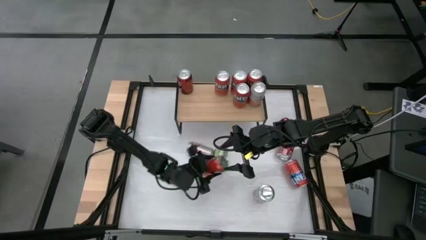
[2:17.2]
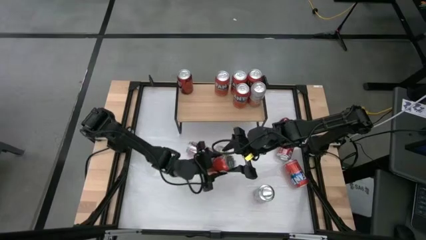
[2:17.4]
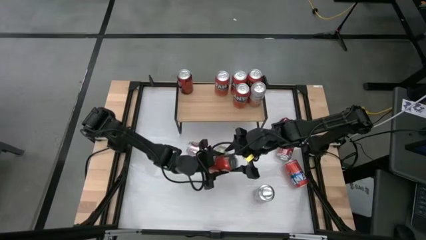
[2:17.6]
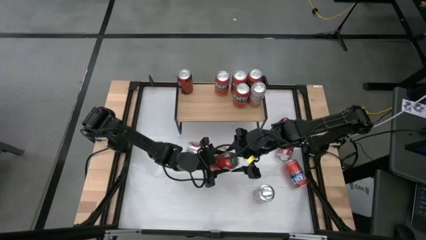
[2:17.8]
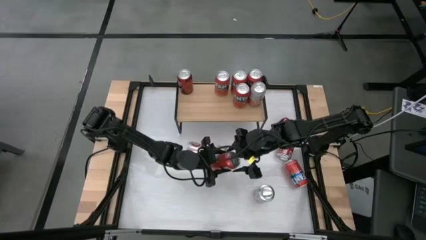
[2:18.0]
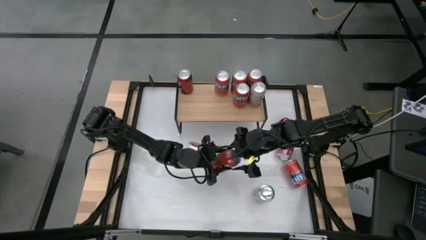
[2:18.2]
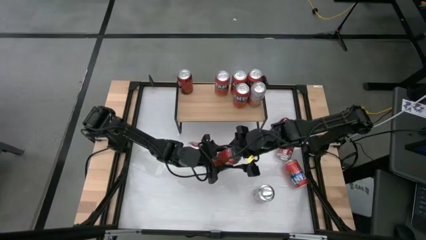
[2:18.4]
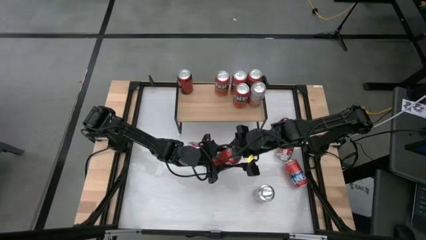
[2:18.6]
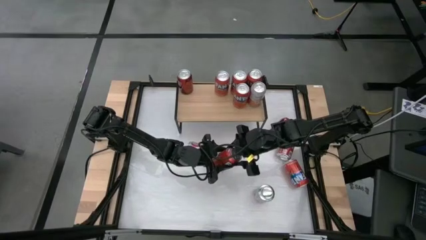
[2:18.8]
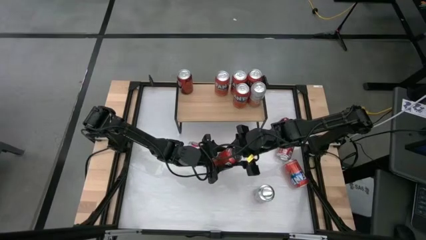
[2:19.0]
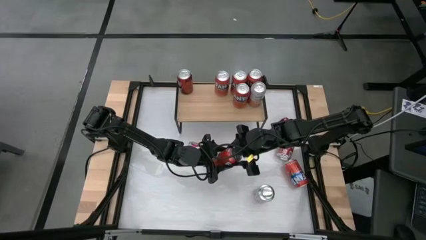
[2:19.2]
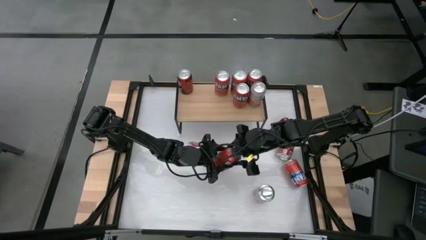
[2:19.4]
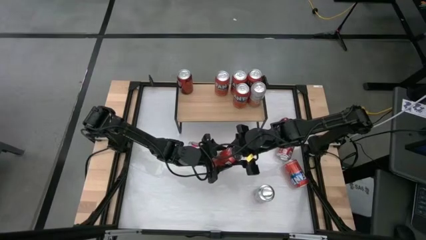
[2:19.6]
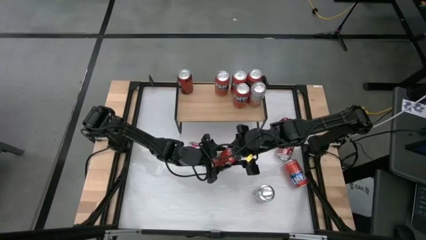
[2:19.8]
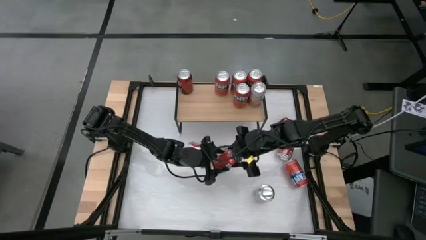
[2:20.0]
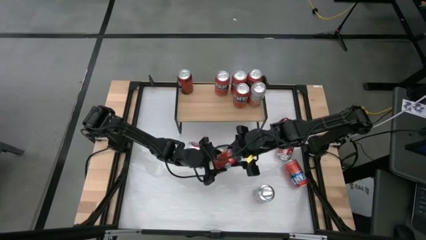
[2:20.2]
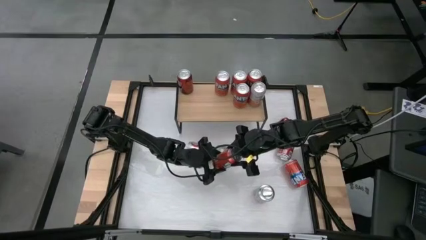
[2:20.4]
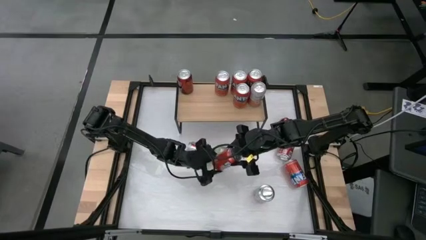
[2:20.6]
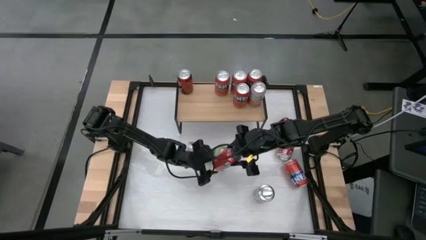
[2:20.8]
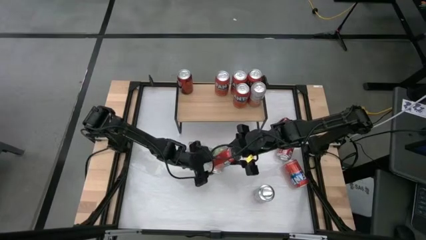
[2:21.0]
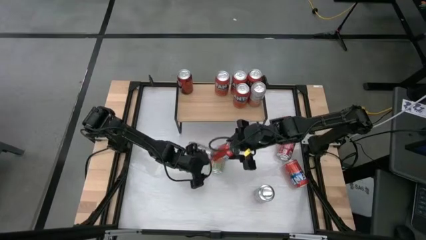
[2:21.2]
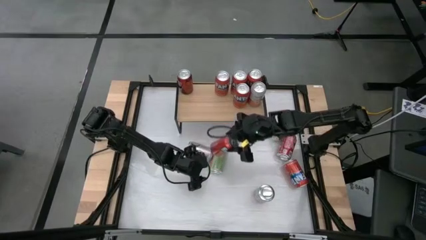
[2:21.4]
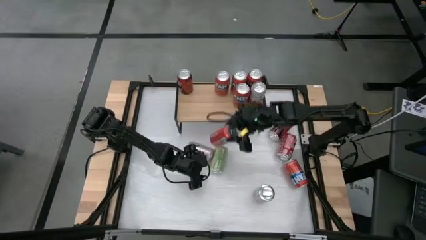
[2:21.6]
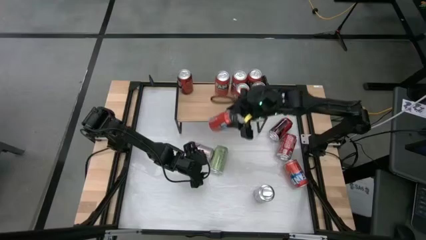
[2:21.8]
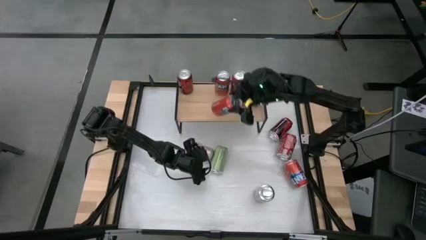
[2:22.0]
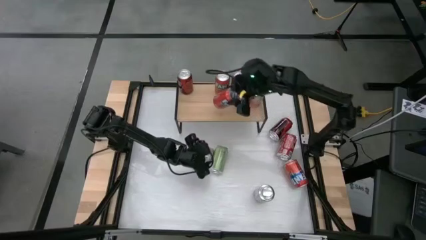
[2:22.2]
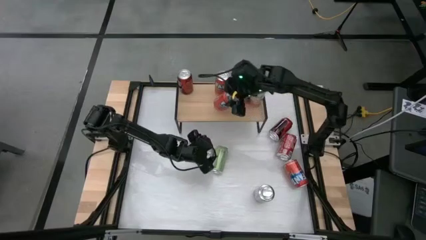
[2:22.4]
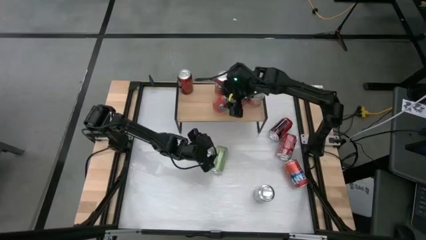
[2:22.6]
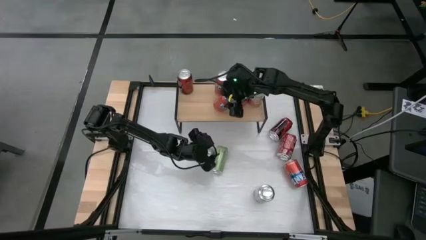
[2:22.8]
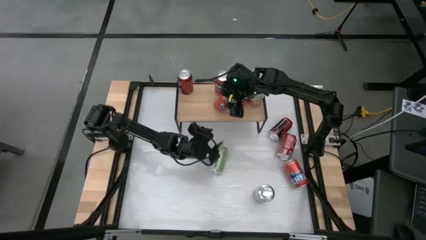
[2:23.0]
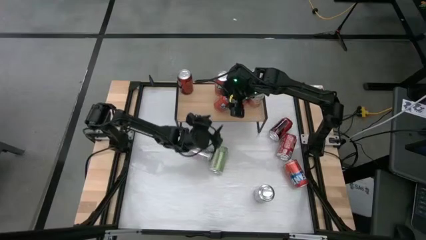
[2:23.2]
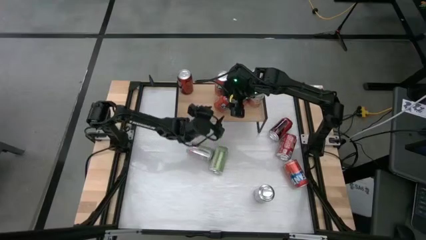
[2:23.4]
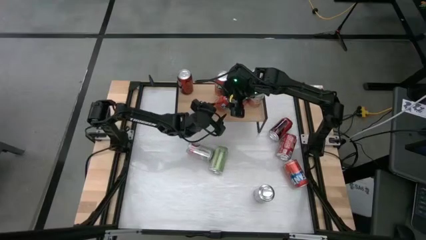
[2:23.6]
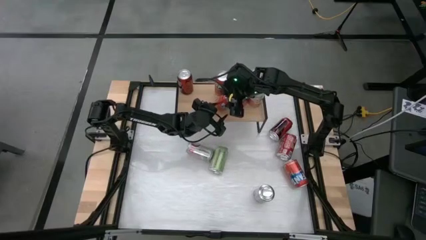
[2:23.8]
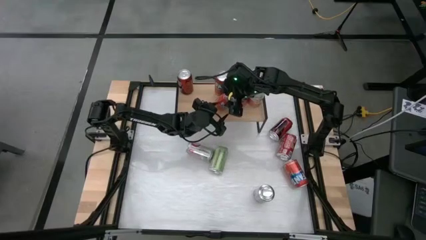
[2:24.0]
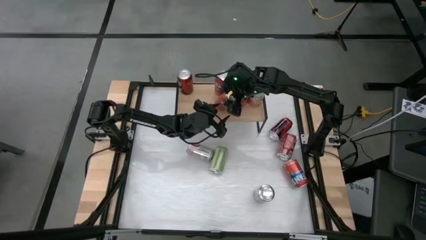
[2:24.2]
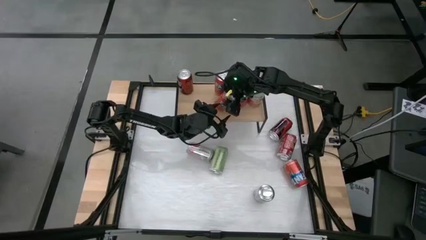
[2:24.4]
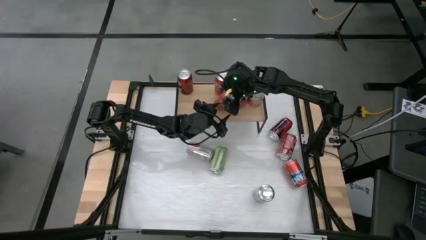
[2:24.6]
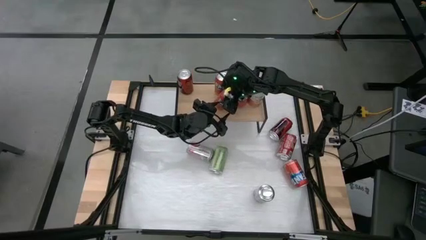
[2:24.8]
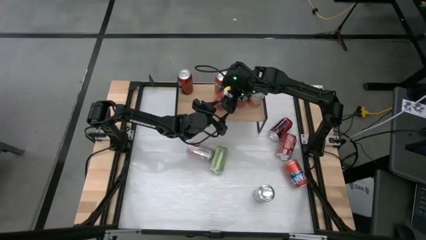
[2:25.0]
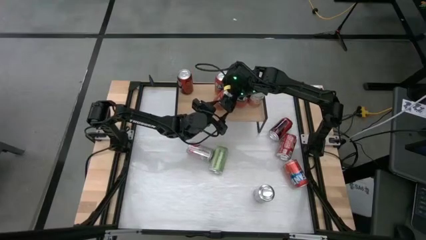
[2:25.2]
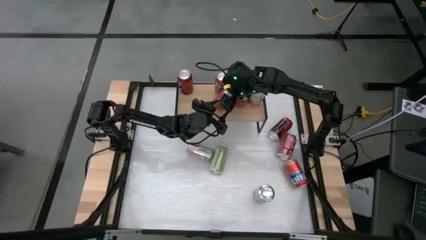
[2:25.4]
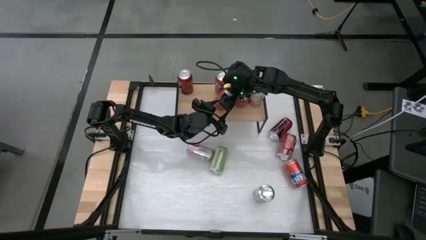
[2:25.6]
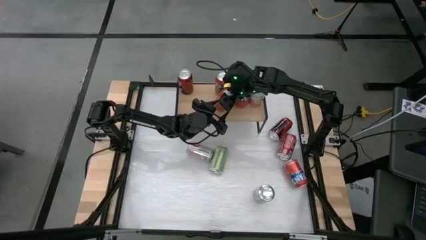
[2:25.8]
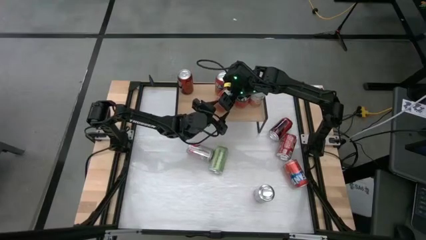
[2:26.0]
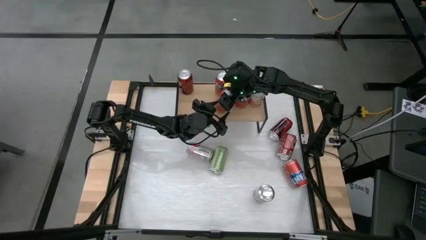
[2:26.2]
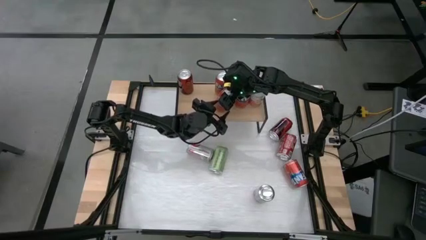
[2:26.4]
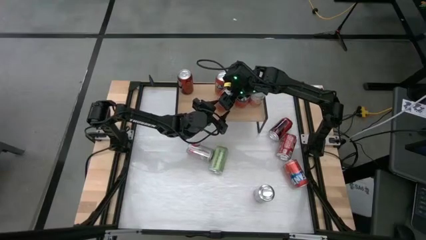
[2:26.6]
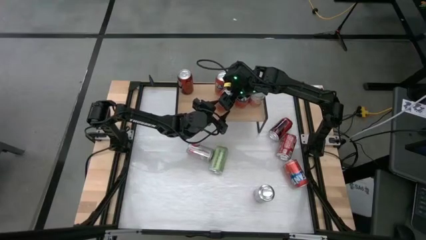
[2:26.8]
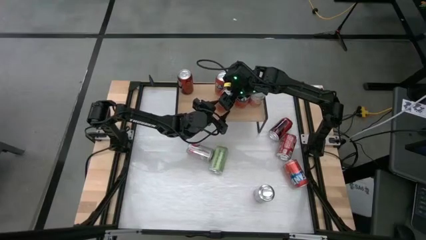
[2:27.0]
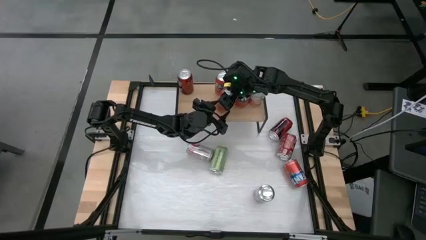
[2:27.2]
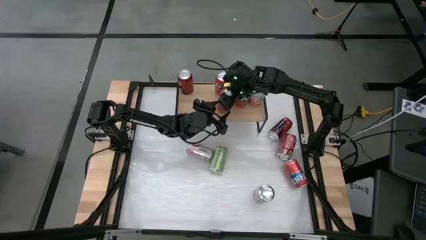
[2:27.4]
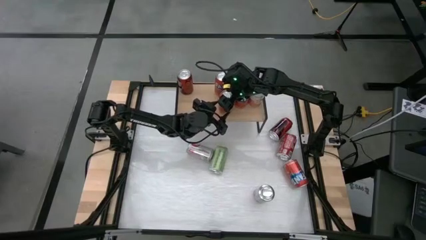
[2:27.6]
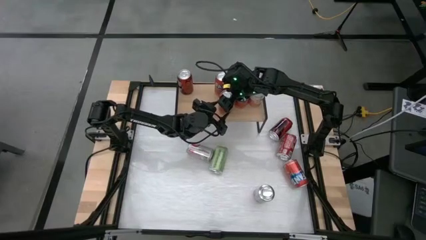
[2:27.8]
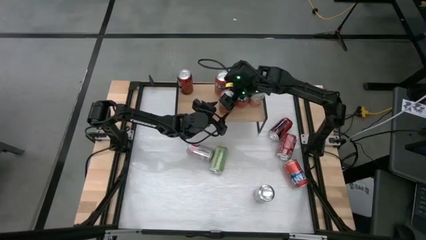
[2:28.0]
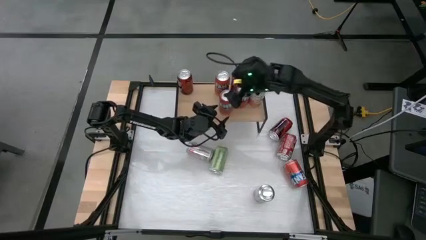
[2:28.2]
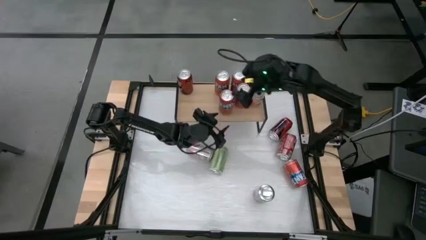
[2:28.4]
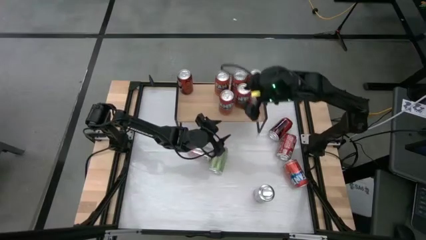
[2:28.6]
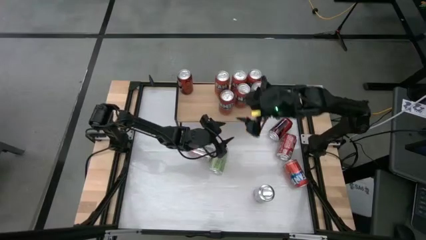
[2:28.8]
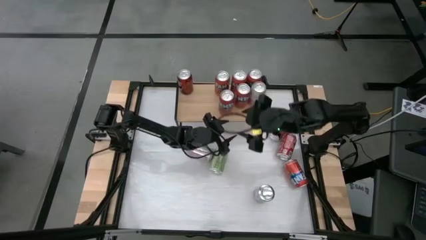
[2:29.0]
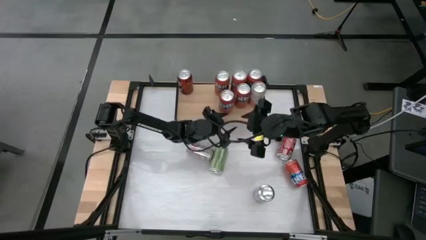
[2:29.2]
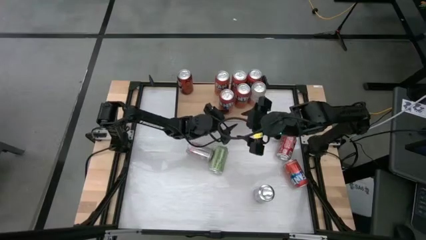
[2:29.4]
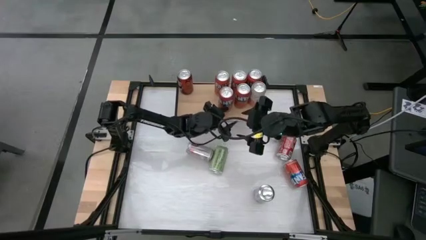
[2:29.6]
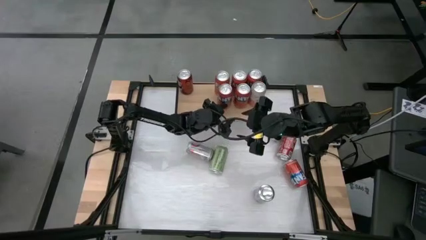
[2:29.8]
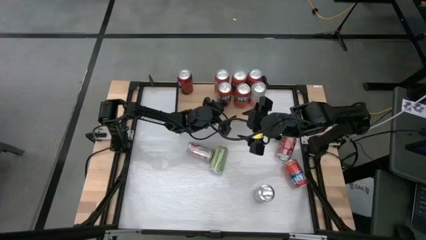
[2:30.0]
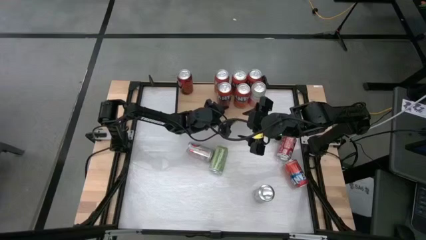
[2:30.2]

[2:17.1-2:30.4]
Task: Place canned beverage on shelf
Put the orange soda can aligned with the other soda can on the shelf
